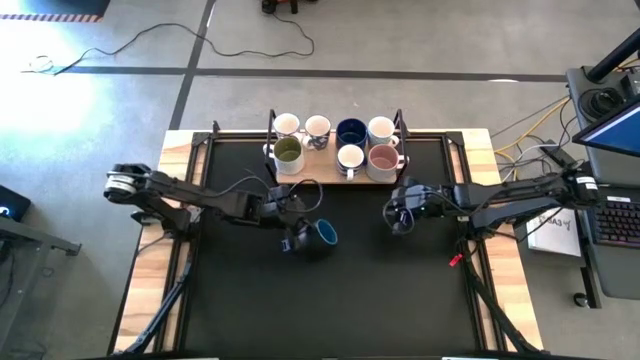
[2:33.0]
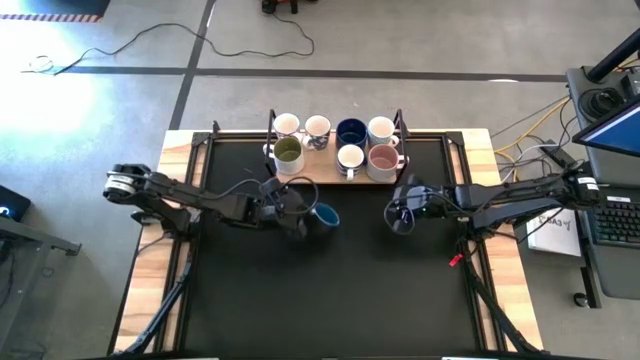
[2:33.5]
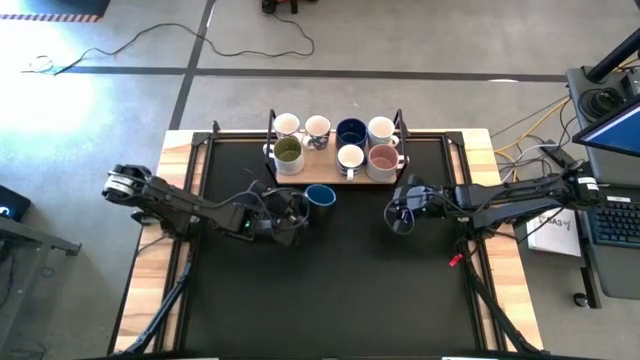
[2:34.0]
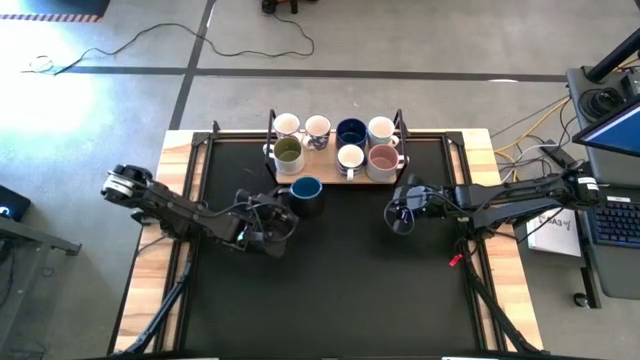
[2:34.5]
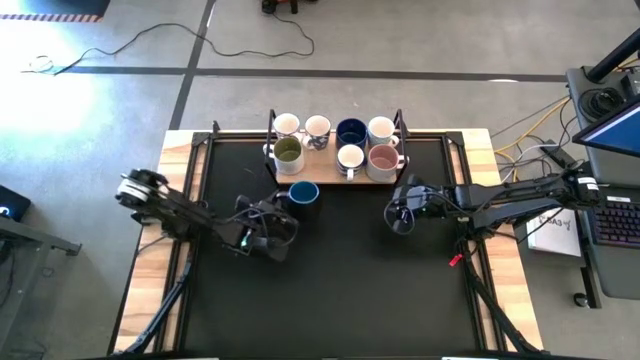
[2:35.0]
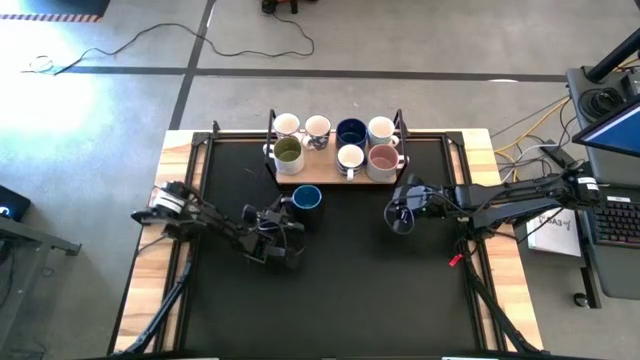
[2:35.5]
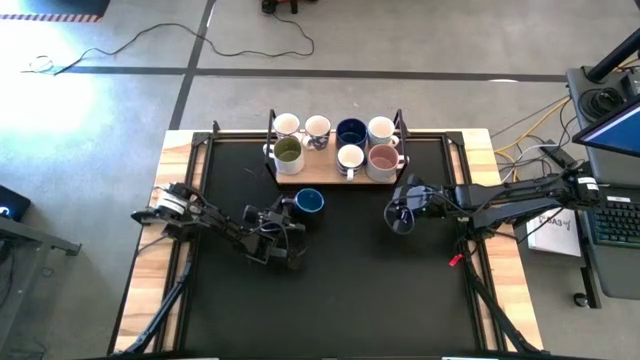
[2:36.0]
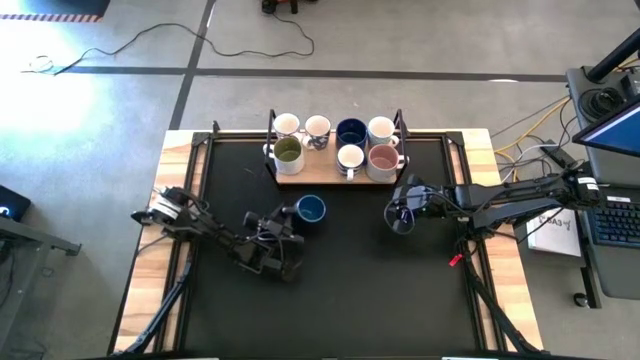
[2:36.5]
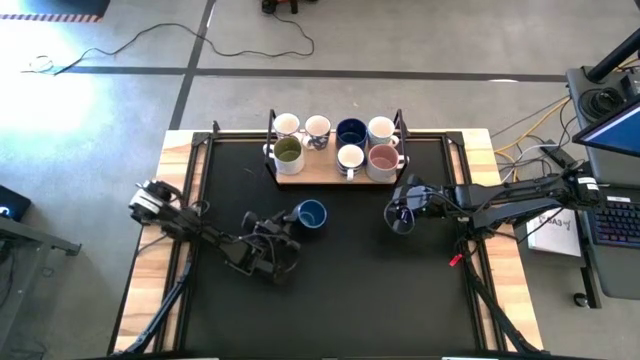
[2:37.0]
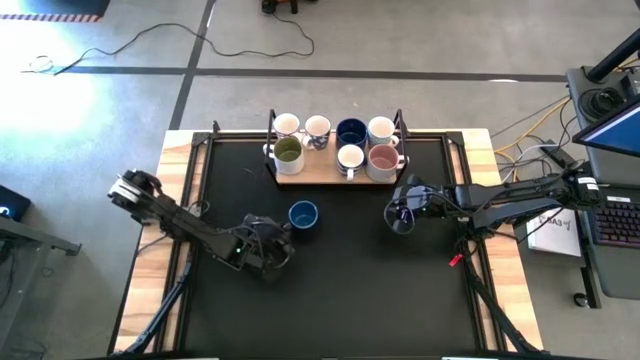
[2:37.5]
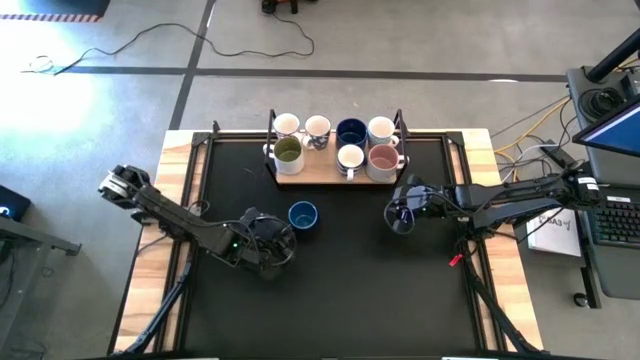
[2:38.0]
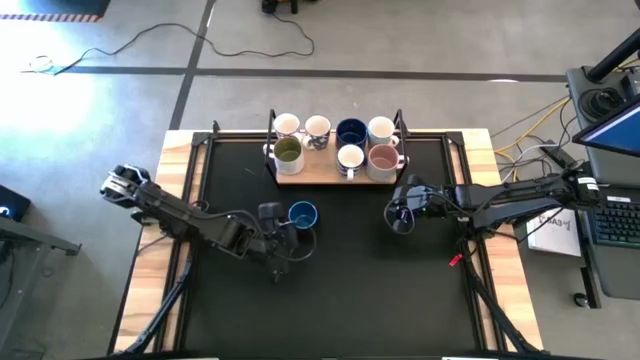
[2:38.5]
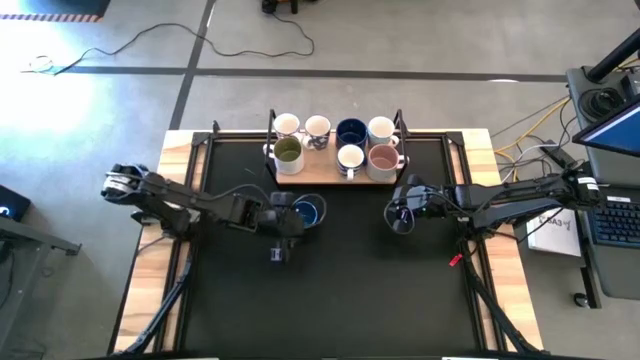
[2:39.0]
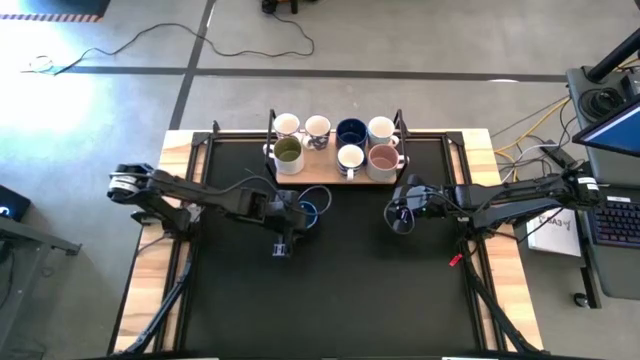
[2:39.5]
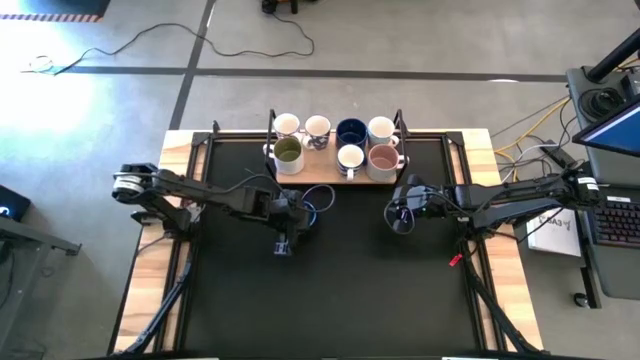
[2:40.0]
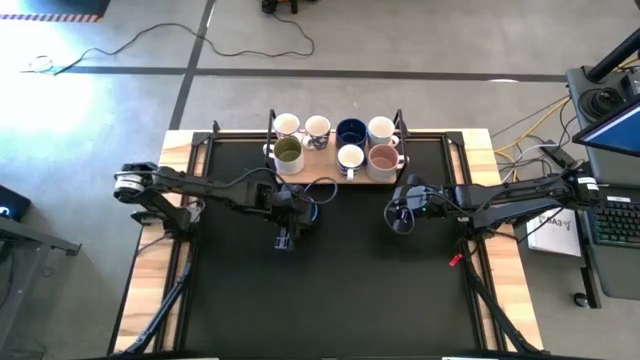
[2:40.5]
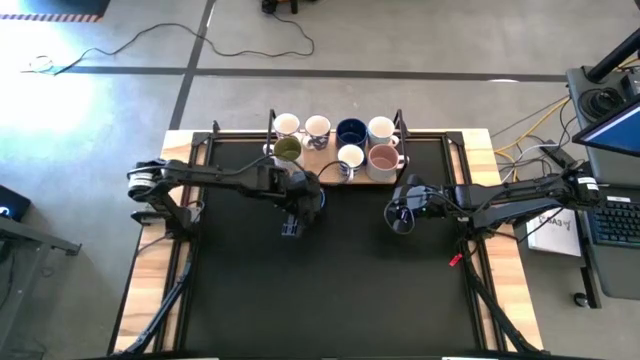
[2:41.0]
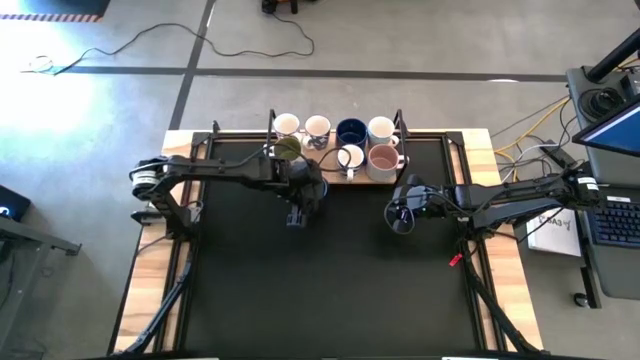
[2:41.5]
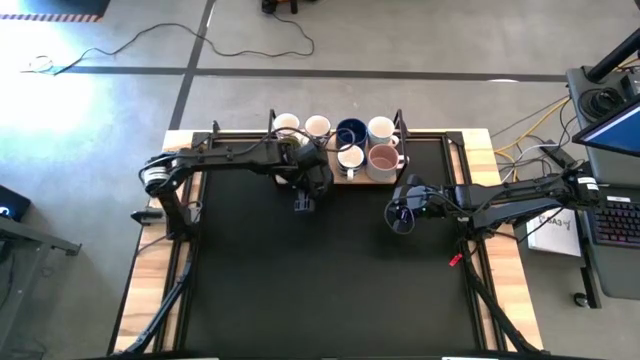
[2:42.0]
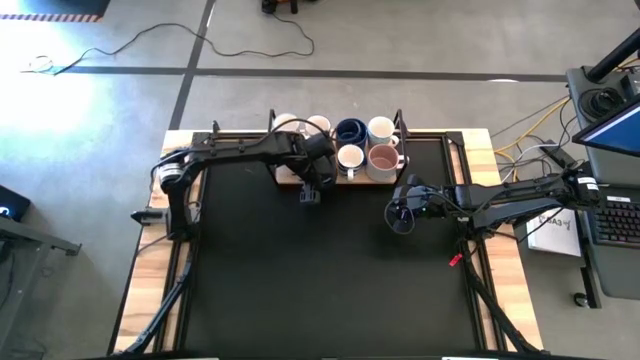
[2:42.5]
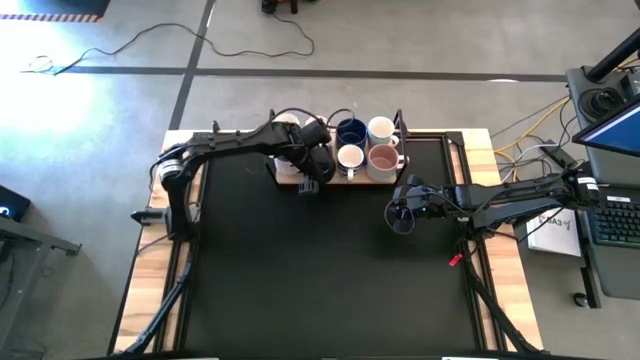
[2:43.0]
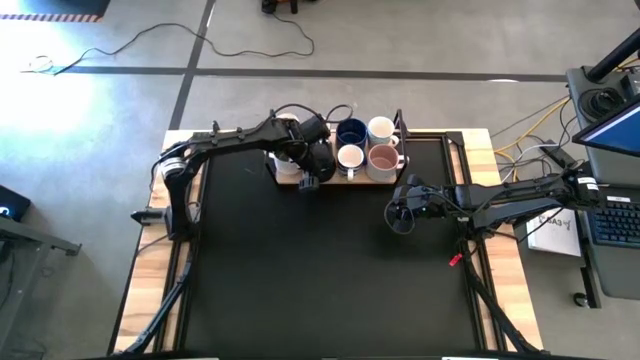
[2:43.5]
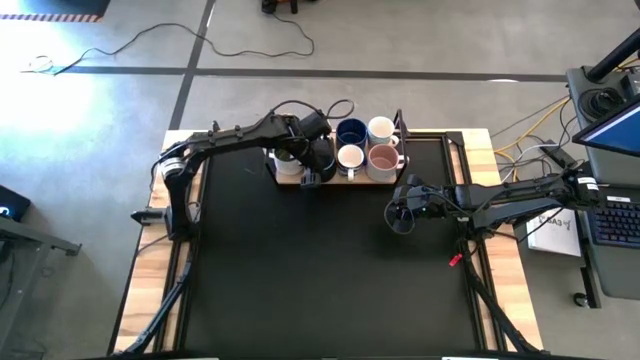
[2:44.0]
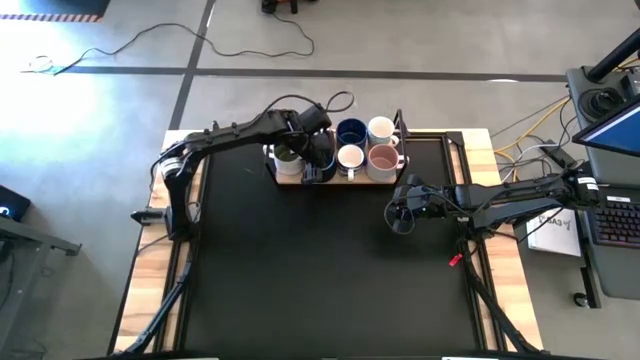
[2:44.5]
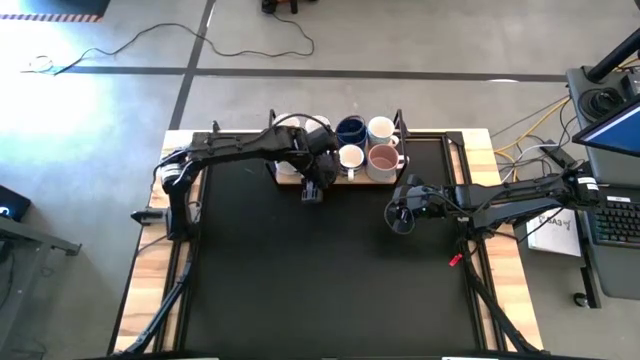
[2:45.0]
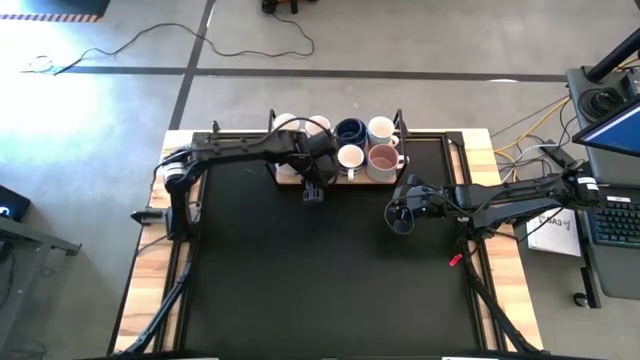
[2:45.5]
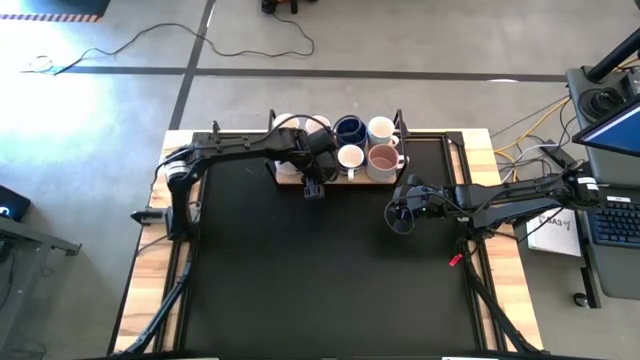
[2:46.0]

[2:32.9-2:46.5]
Task: Place coffee mugs
Put the black mug on the shelf aligned with the other the blue mug

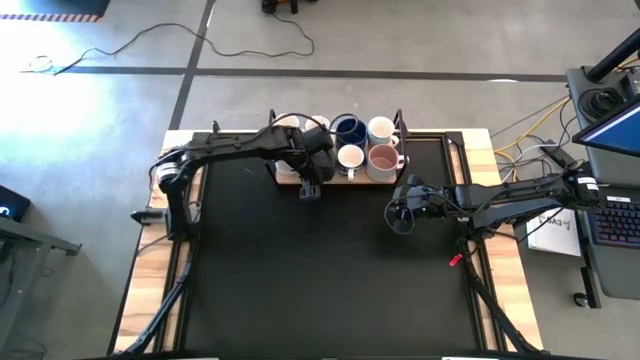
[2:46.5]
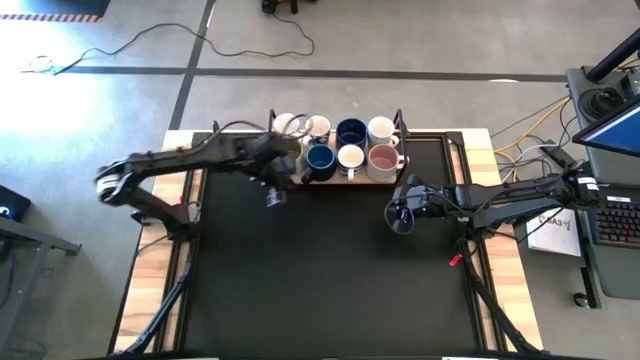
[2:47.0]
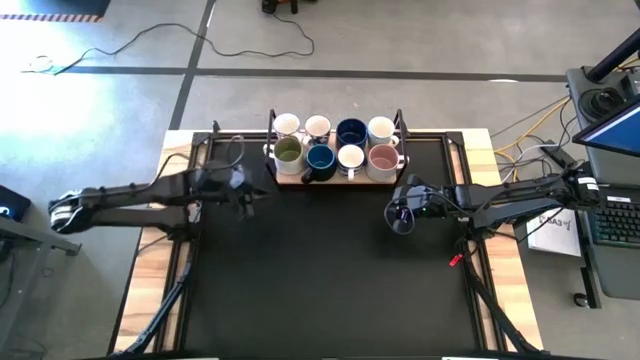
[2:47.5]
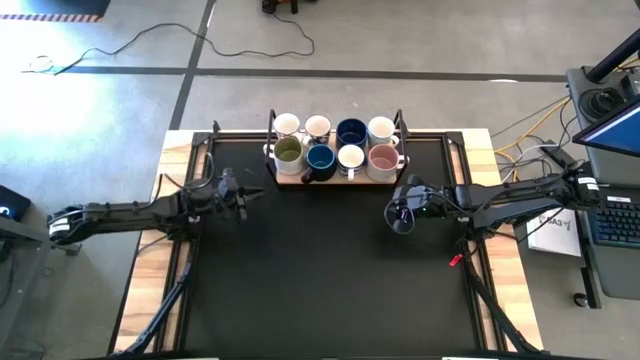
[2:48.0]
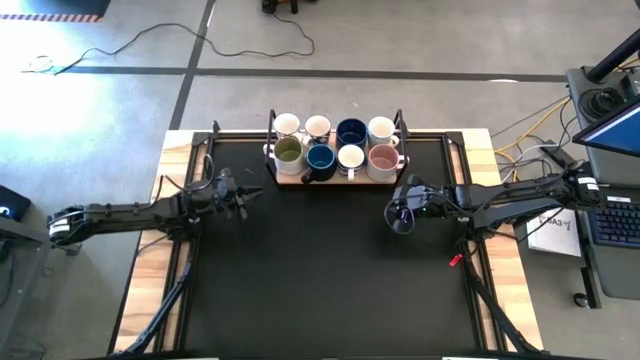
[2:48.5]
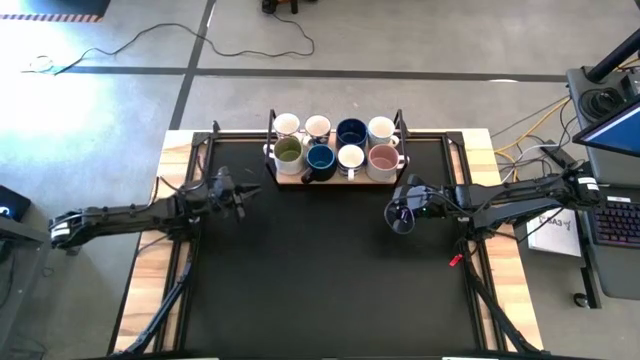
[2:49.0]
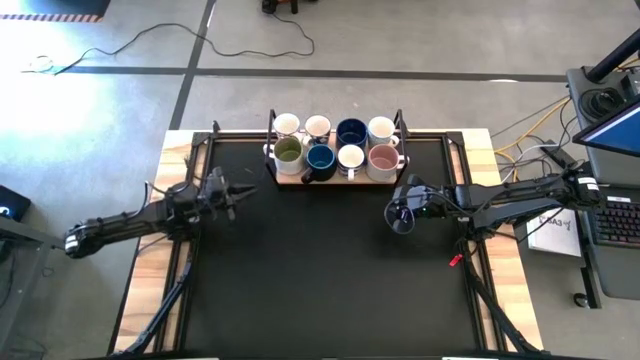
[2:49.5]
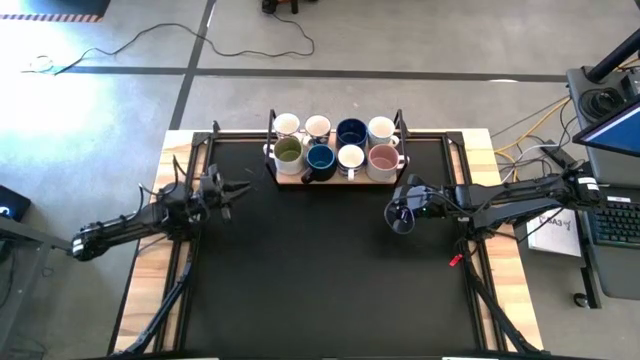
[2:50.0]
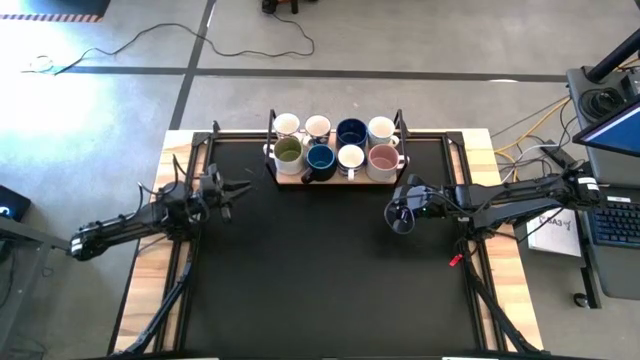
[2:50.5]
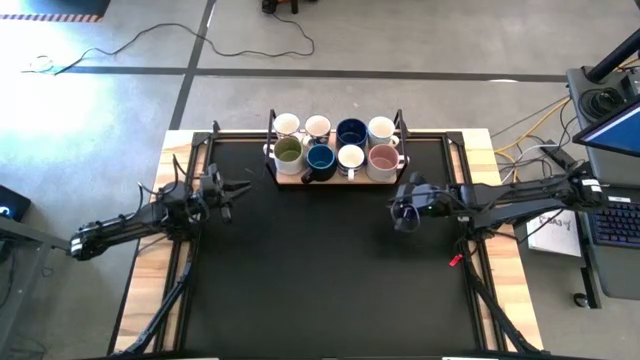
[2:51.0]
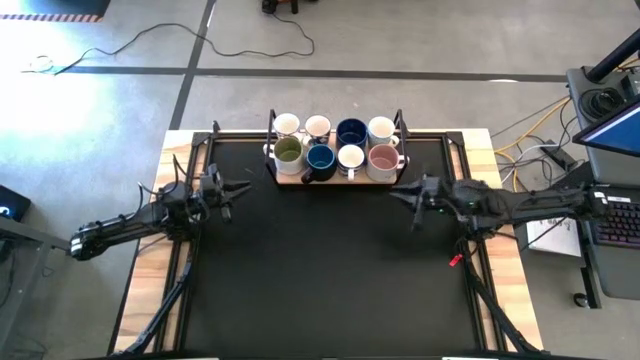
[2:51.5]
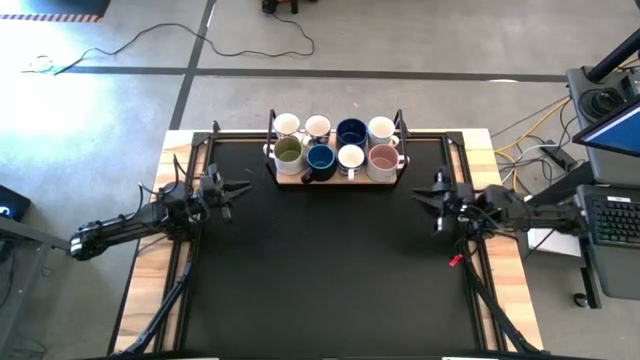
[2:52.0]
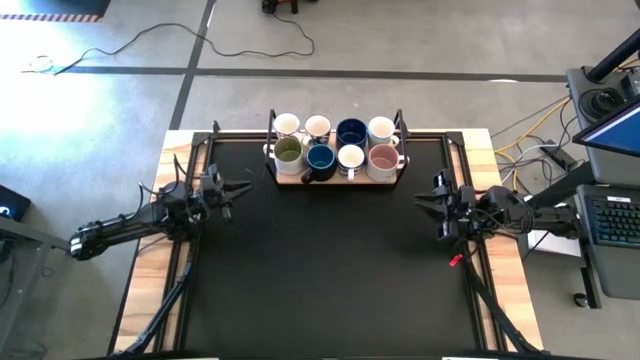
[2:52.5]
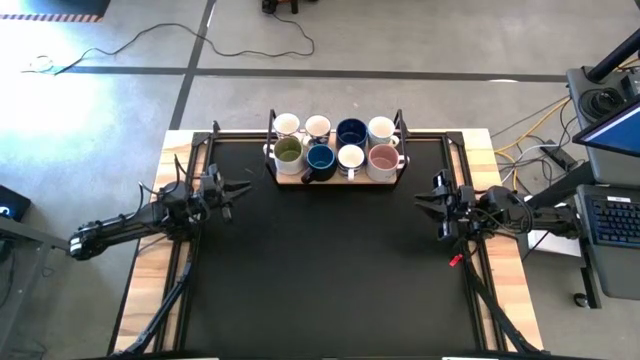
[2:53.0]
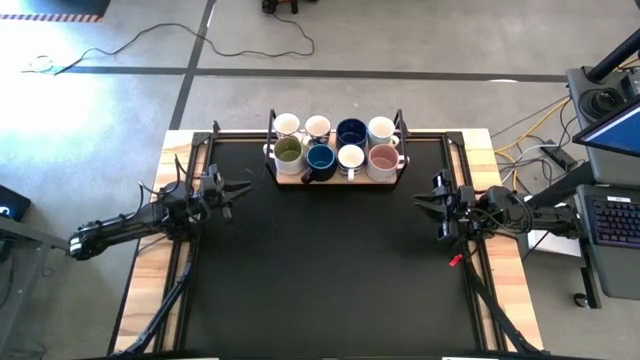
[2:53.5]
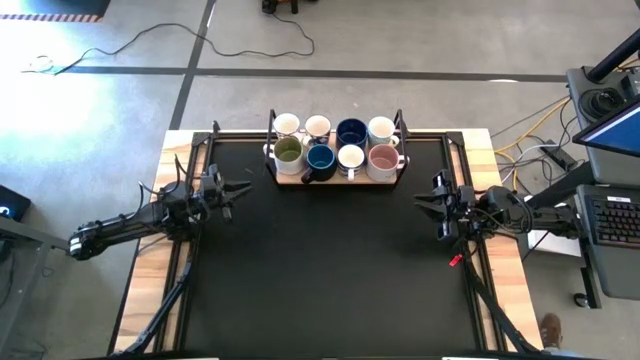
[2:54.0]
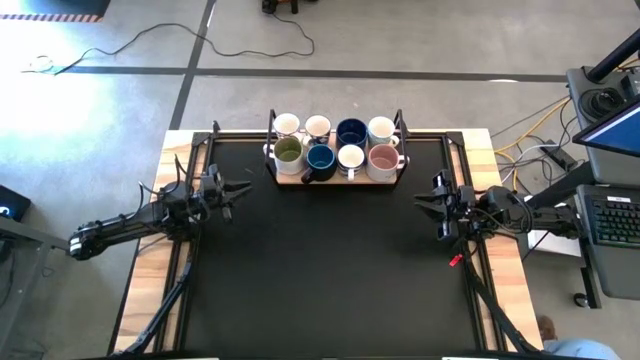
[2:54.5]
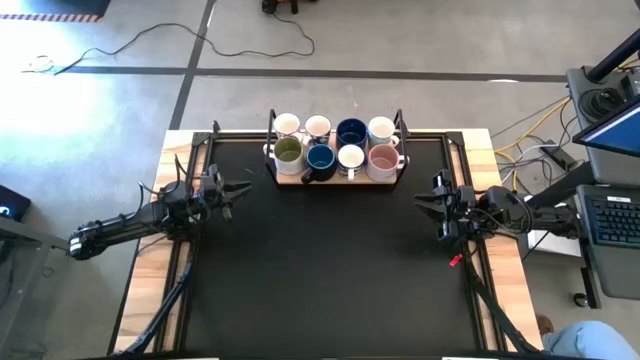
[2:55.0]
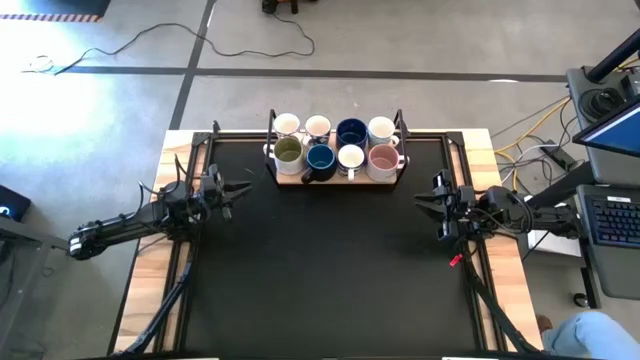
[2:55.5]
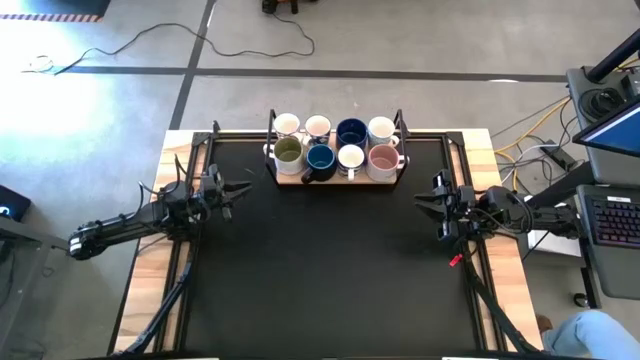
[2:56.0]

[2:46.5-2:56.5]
Return to Home Position
